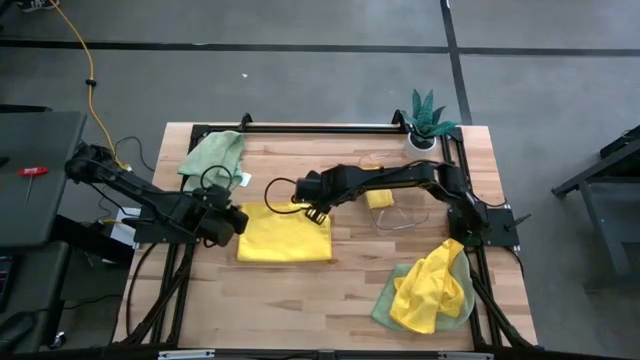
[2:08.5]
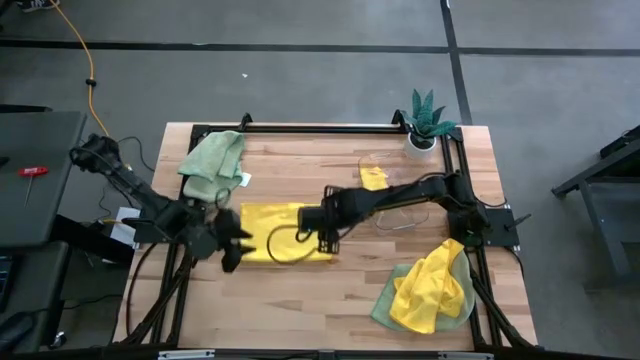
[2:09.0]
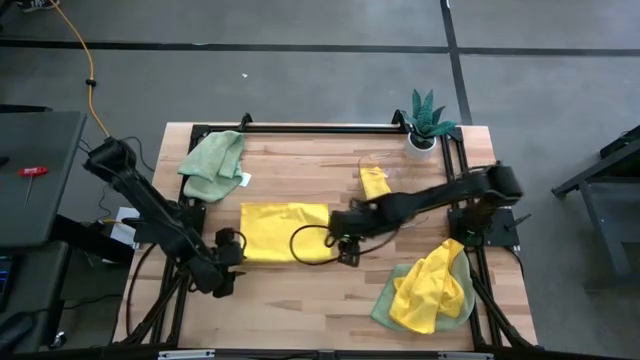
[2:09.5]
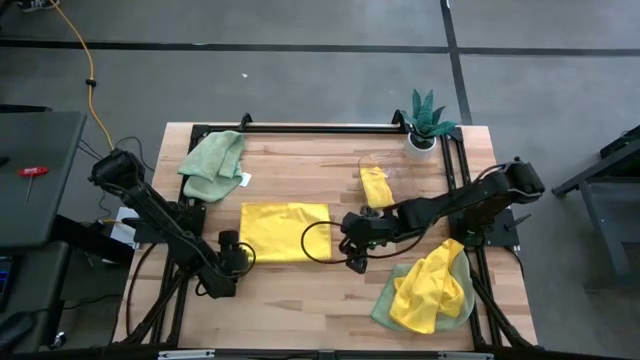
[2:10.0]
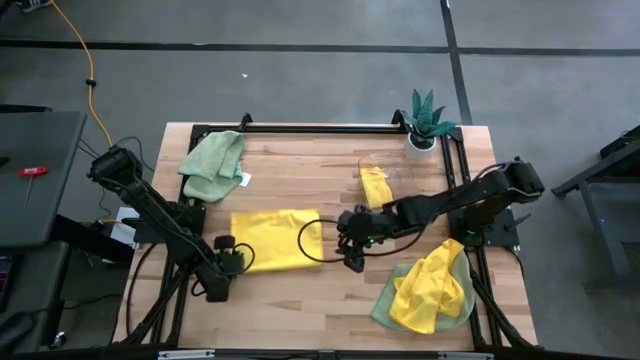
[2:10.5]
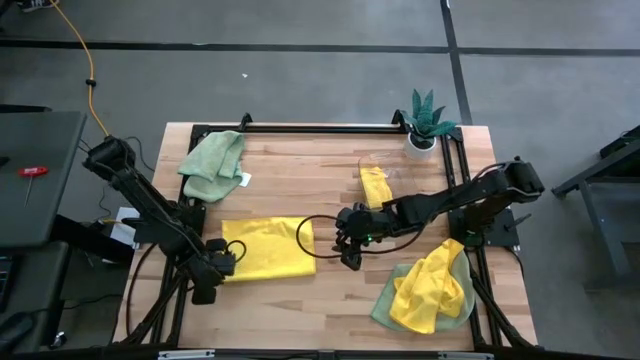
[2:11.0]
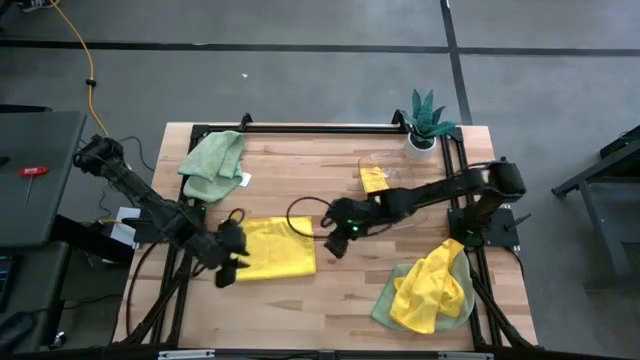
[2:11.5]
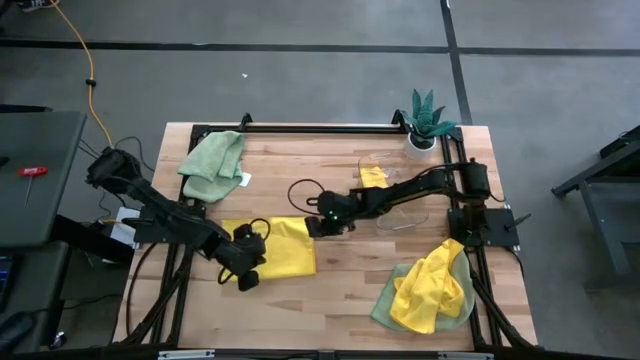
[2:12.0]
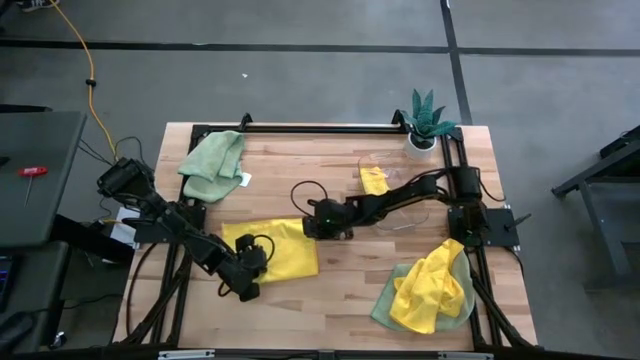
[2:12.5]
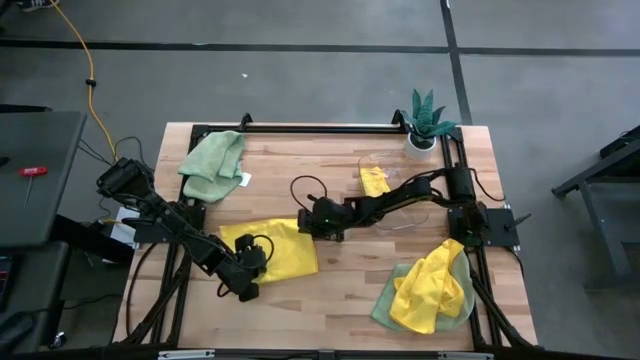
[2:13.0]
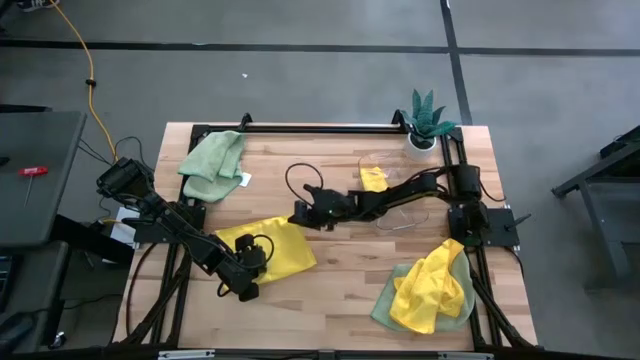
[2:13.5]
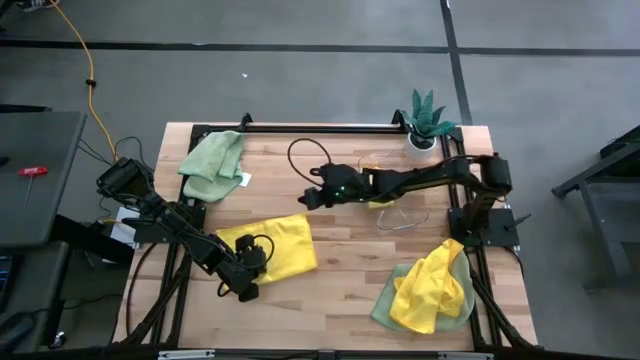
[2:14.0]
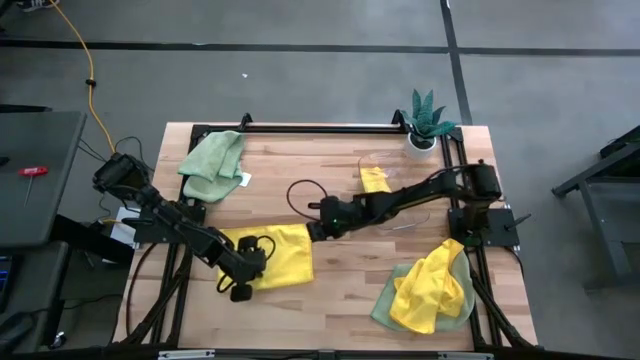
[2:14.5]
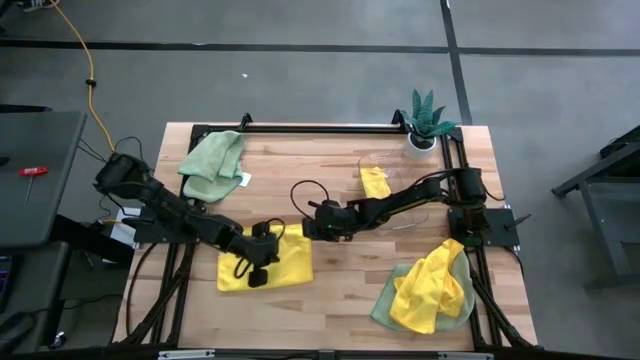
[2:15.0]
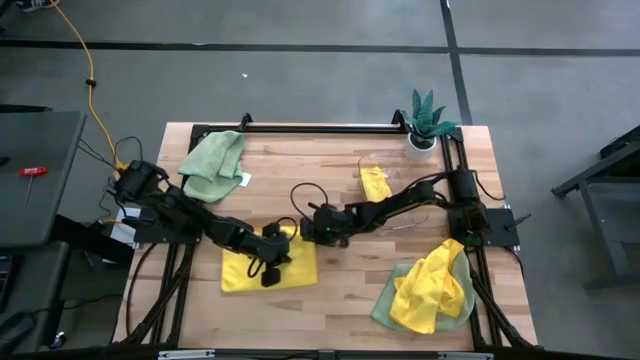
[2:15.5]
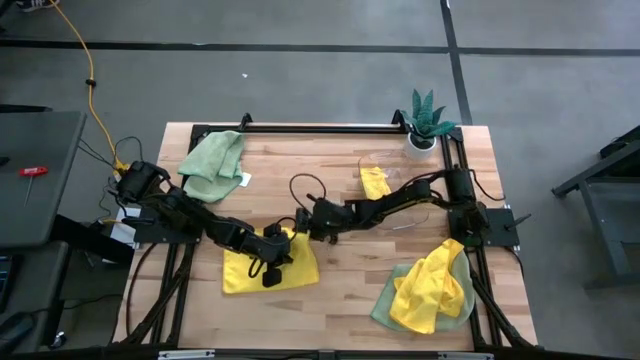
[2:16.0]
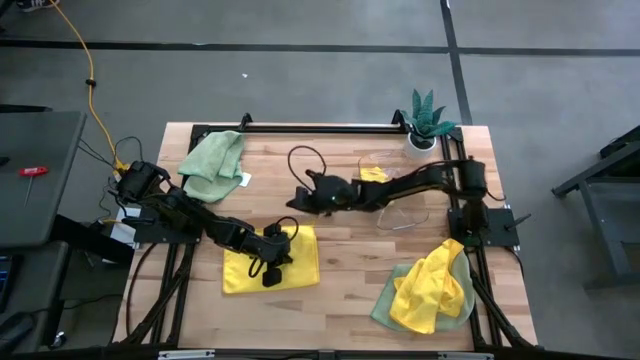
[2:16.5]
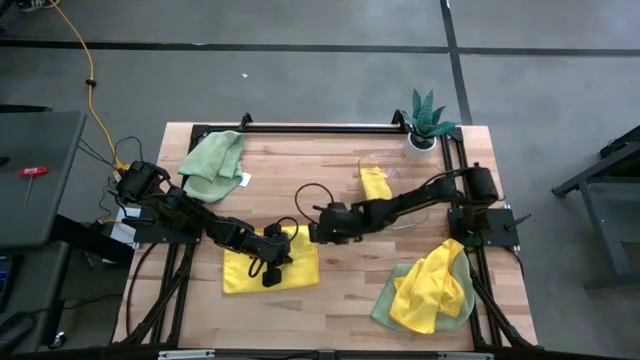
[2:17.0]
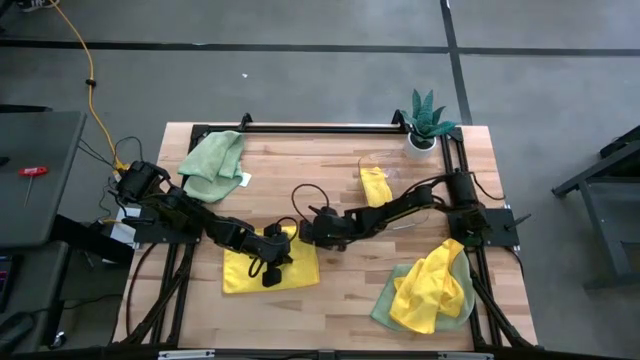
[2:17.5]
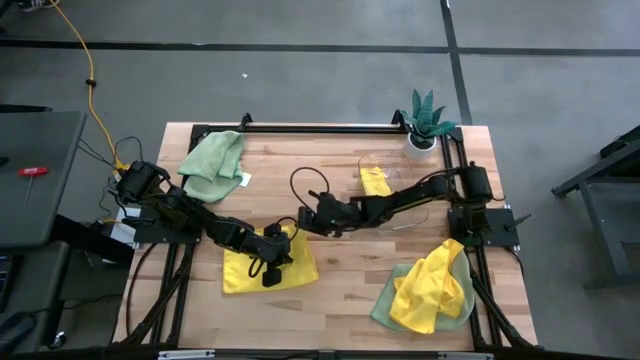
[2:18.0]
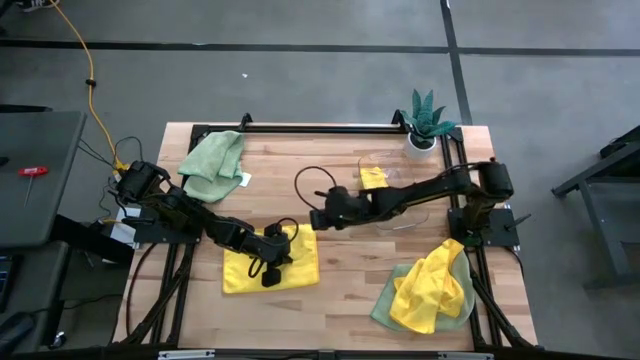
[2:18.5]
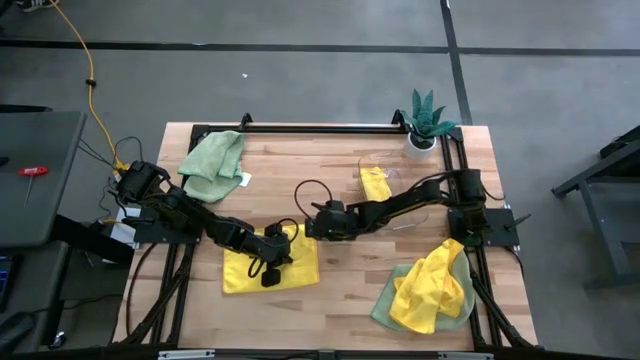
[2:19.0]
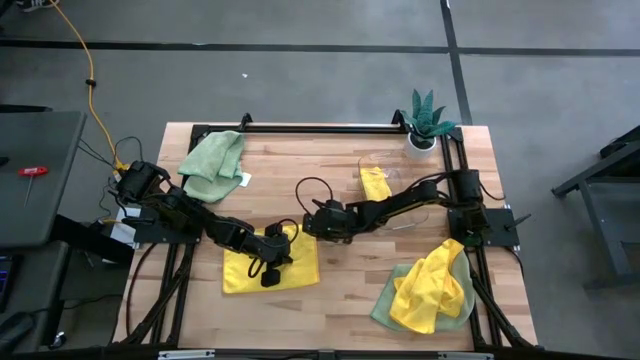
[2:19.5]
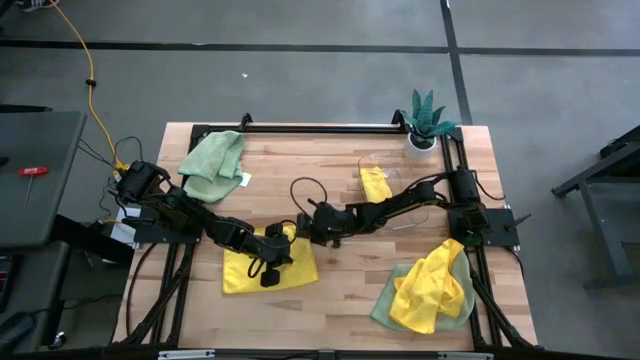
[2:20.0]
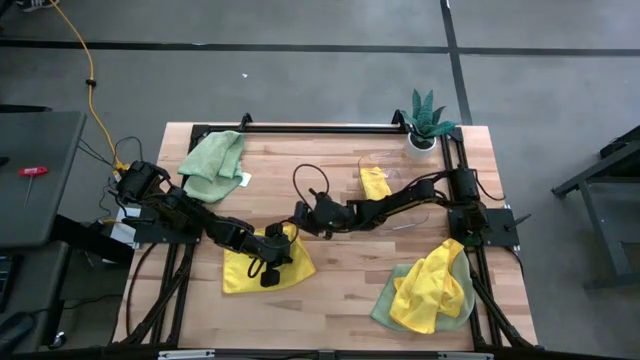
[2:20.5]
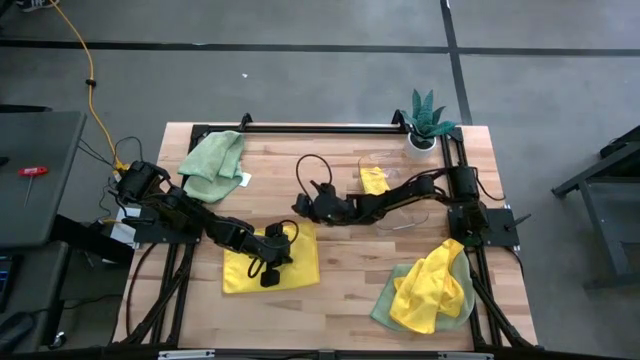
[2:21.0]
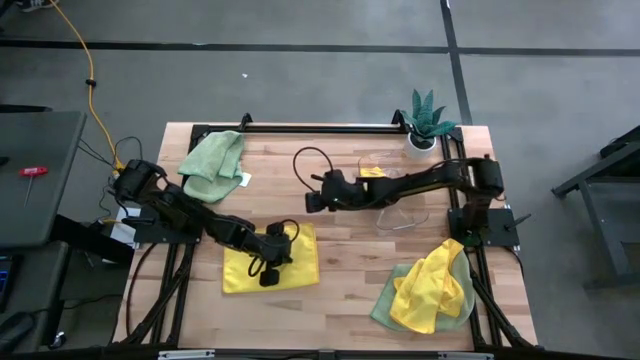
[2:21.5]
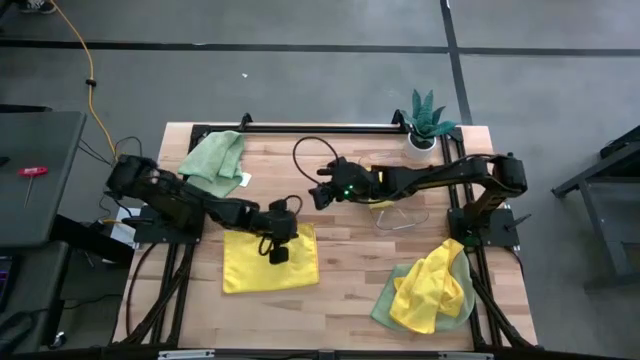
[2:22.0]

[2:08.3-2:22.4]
Task: Fold microfiber towels
Fold the top yellow microfiber towel

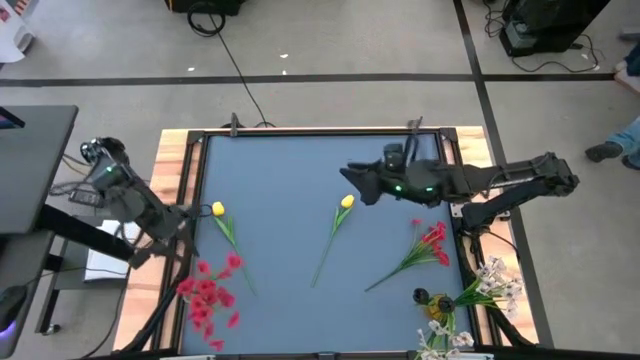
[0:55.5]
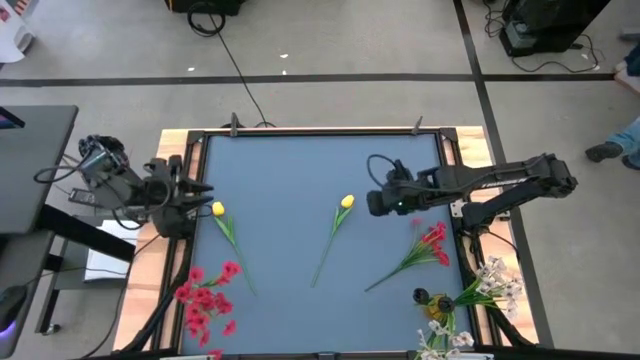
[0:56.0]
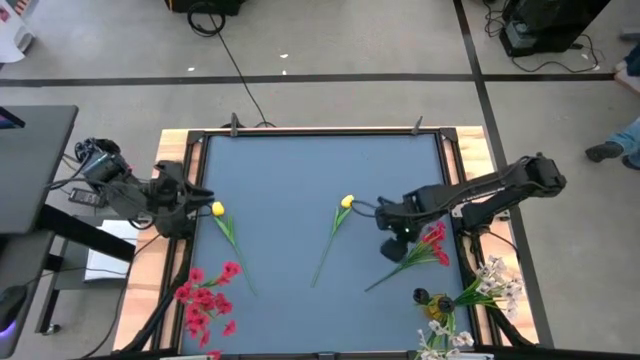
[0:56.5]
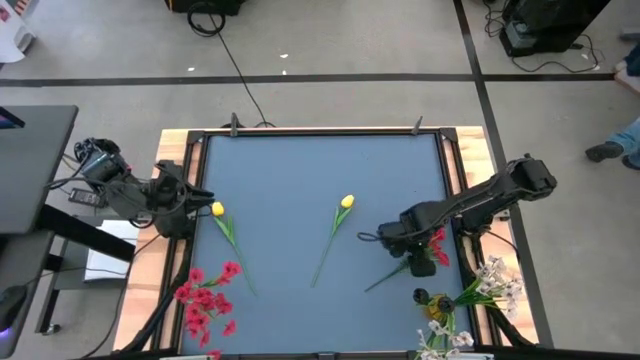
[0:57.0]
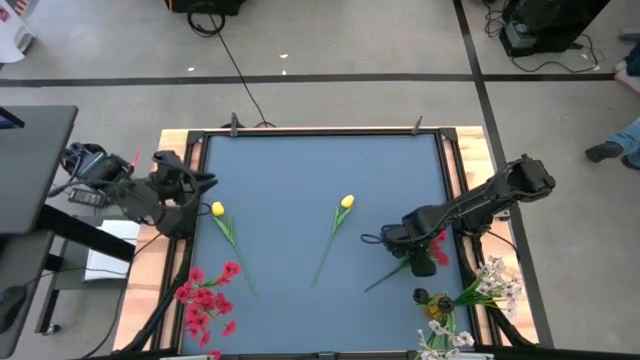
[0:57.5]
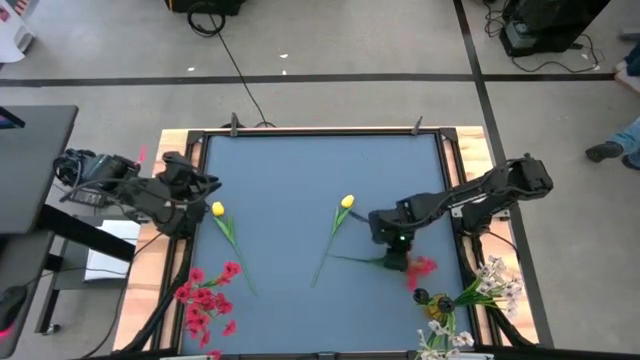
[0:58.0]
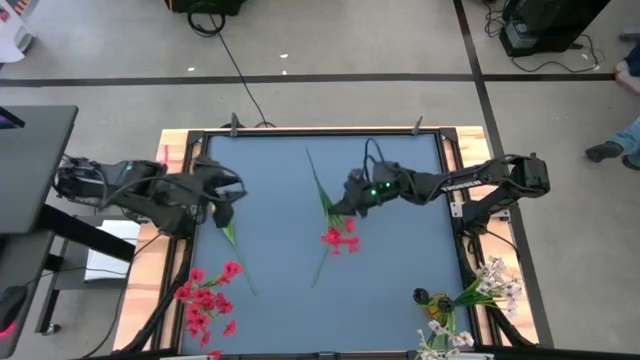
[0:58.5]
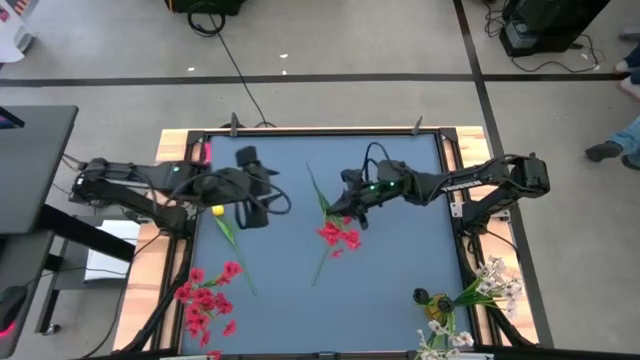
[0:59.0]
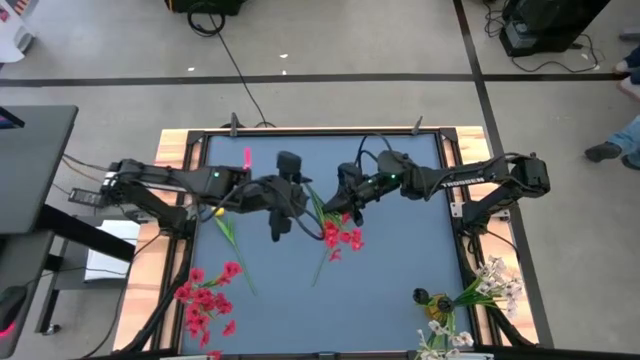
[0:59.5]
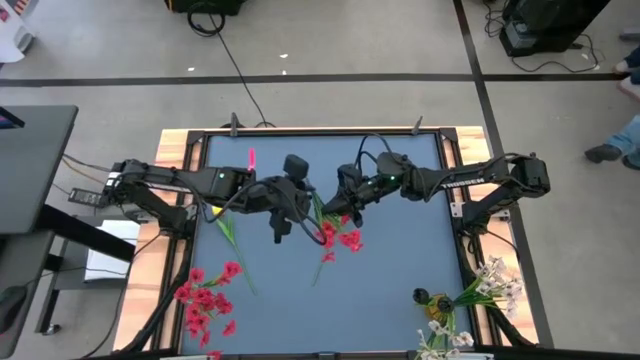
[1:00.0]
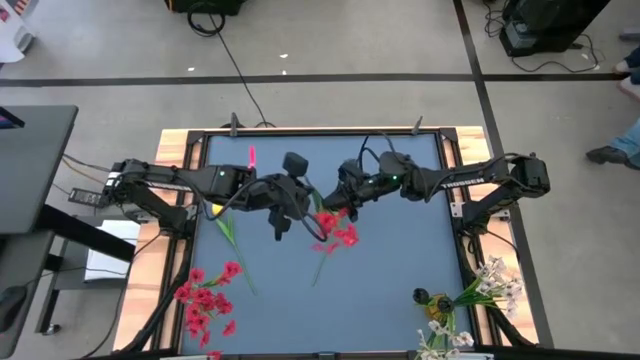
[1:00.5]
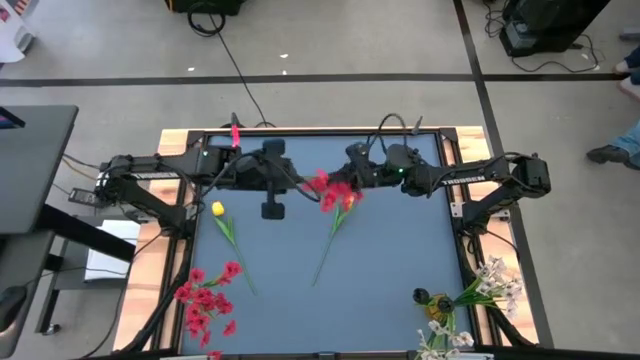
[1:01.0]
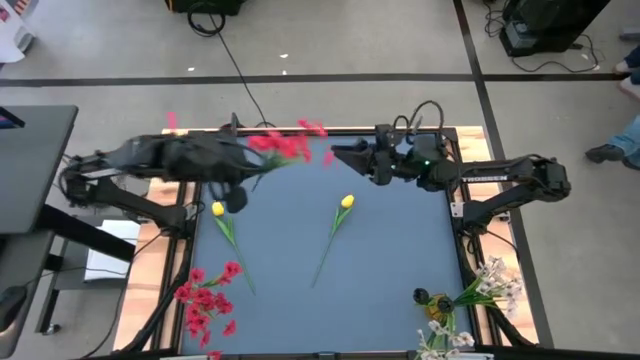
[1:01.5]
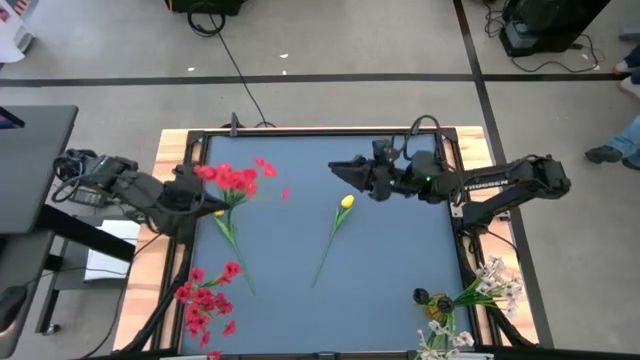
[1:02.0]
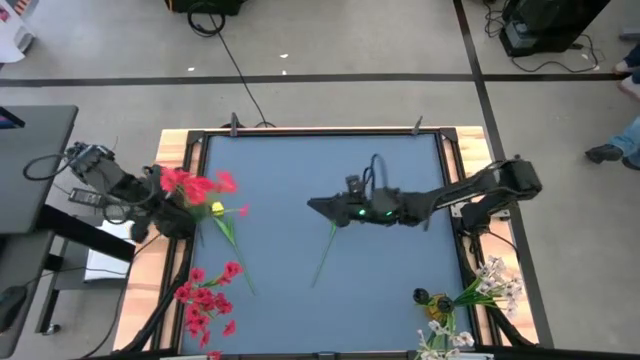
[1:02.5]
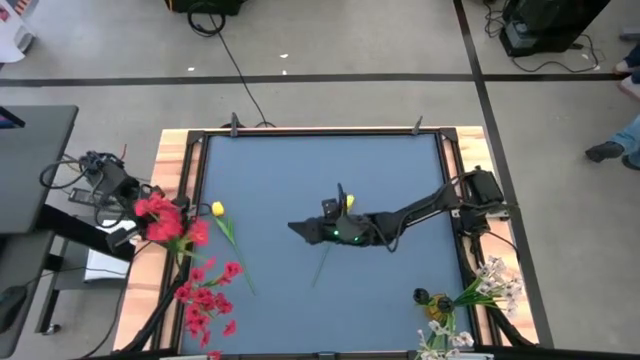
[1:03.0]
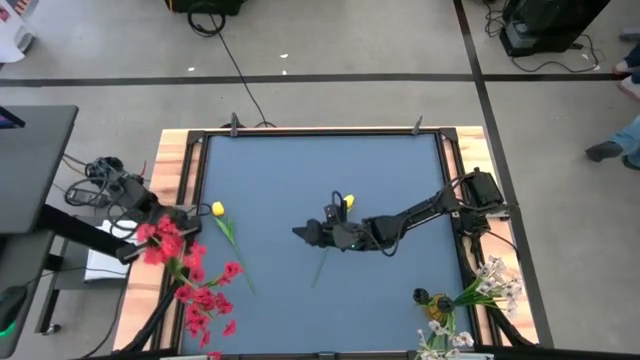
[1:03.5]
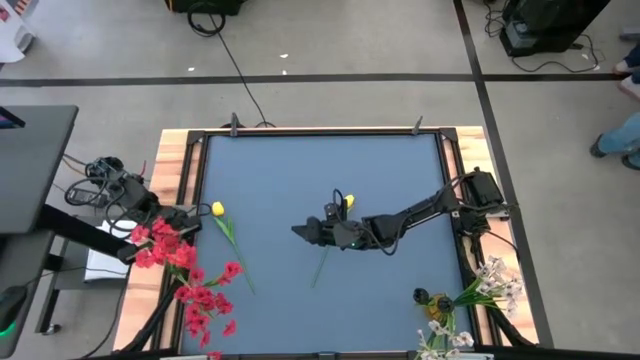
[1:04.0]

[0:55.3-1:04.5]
Task: Sort flowers into vase by color
Put the red flower into the transparent flower vase
